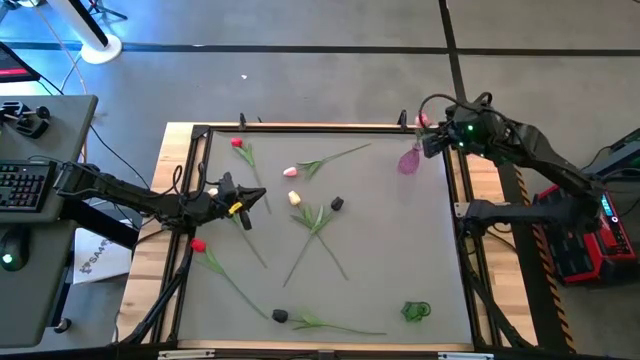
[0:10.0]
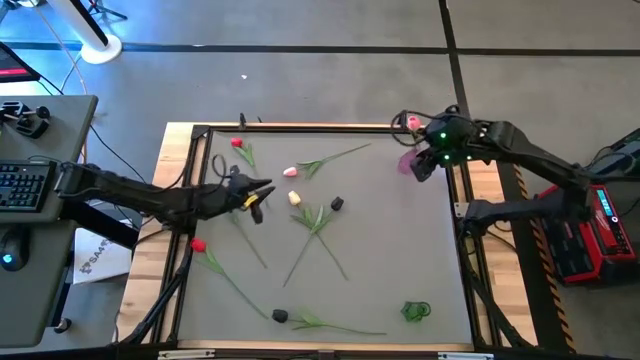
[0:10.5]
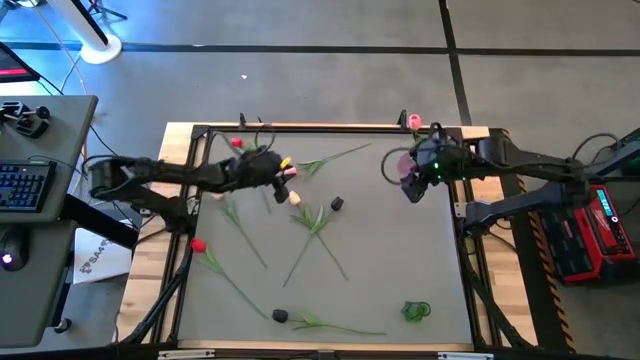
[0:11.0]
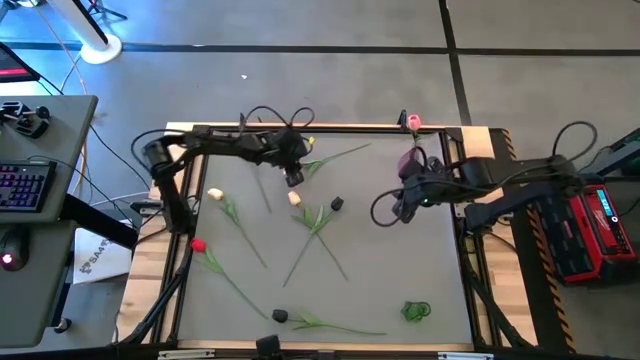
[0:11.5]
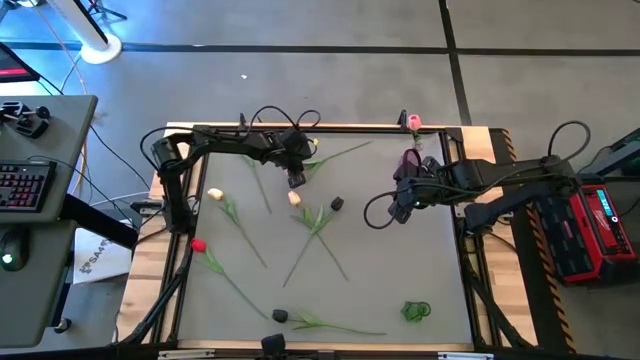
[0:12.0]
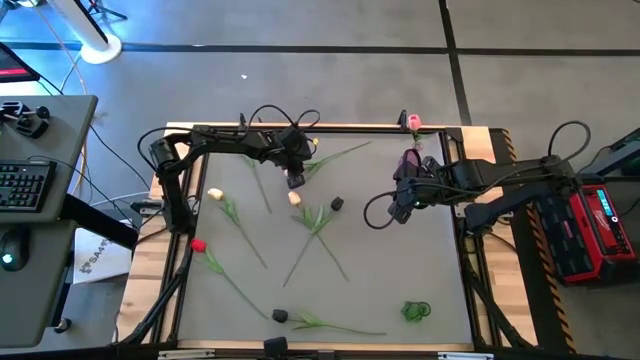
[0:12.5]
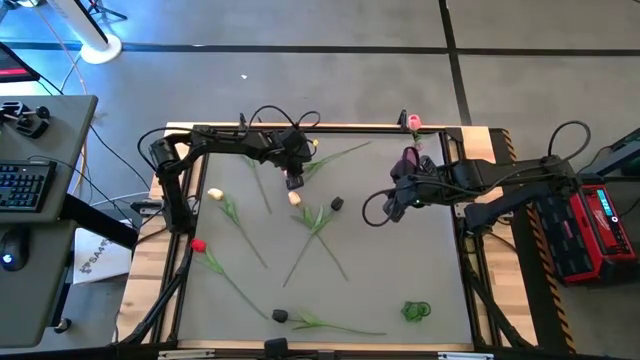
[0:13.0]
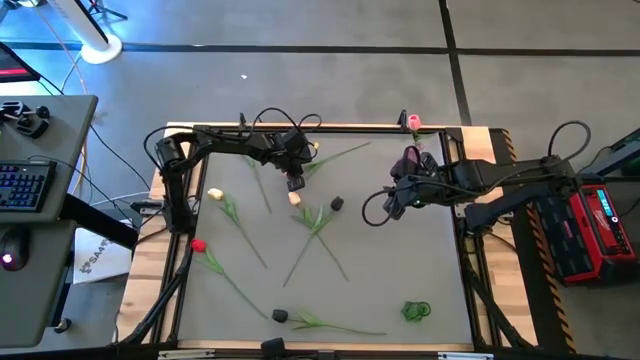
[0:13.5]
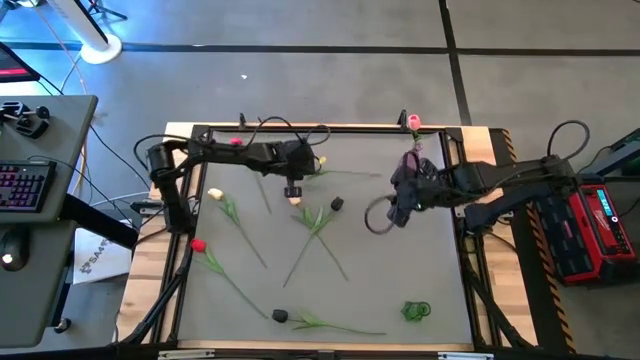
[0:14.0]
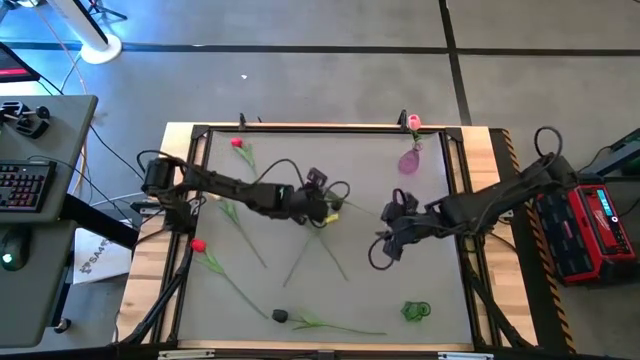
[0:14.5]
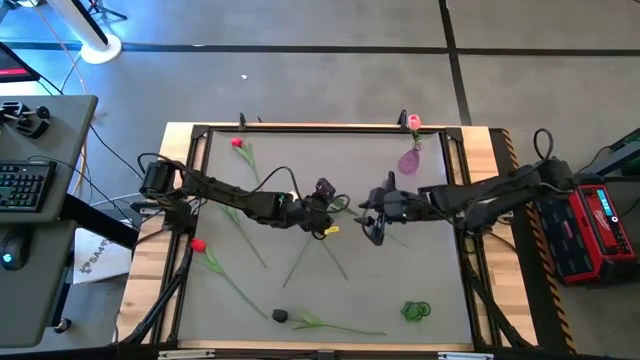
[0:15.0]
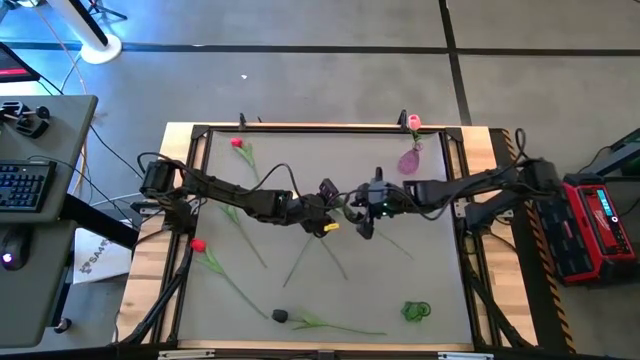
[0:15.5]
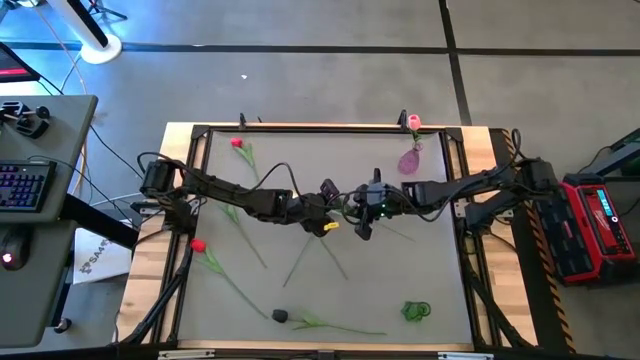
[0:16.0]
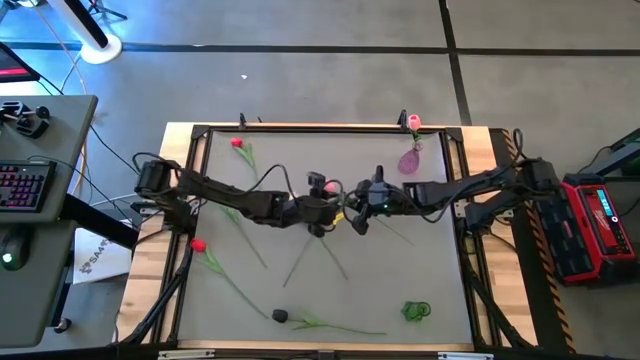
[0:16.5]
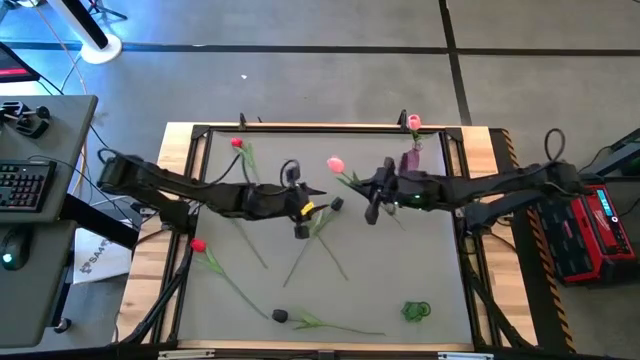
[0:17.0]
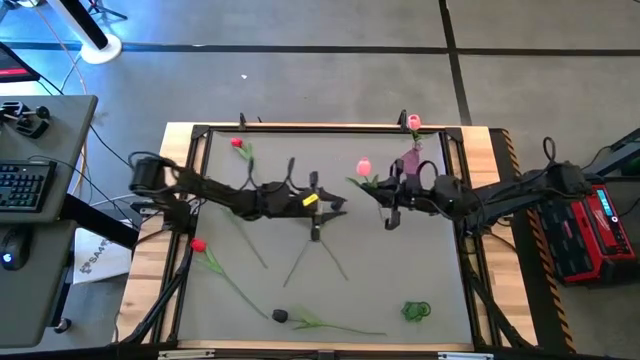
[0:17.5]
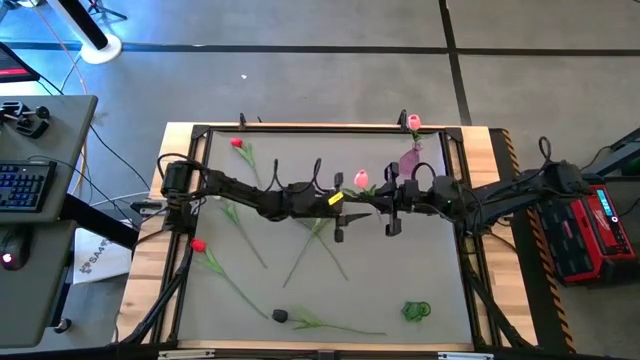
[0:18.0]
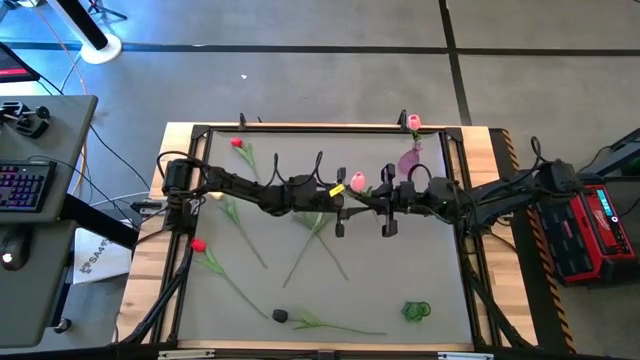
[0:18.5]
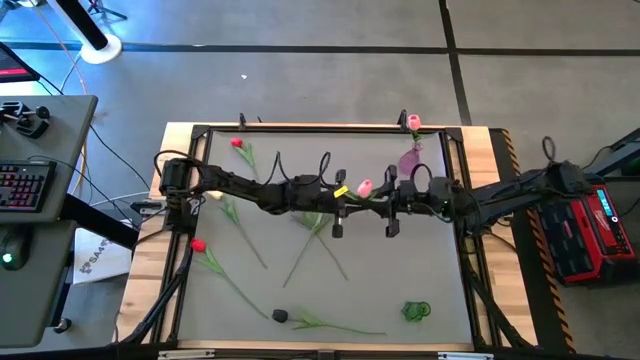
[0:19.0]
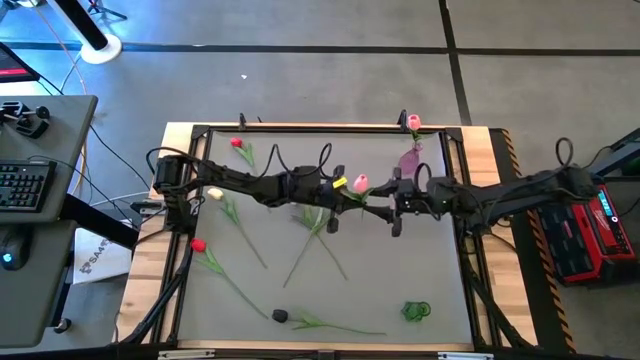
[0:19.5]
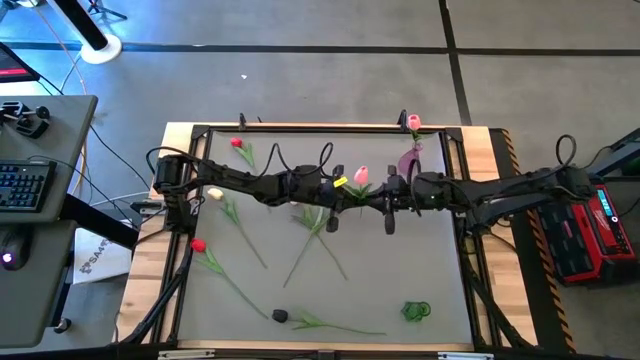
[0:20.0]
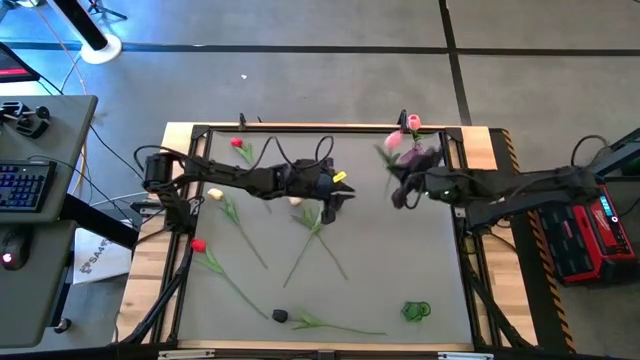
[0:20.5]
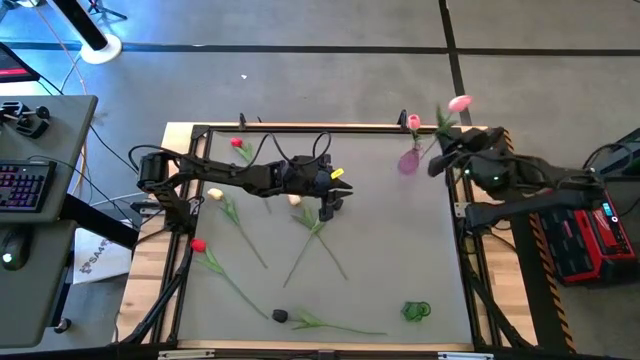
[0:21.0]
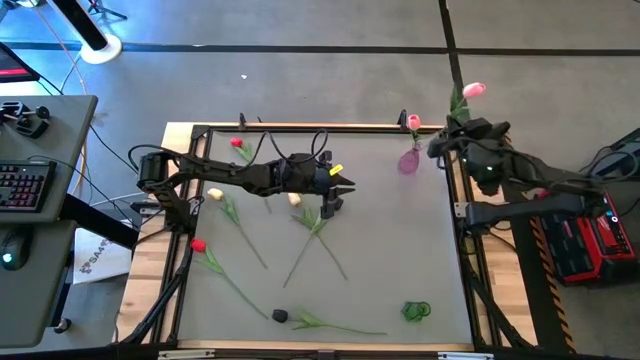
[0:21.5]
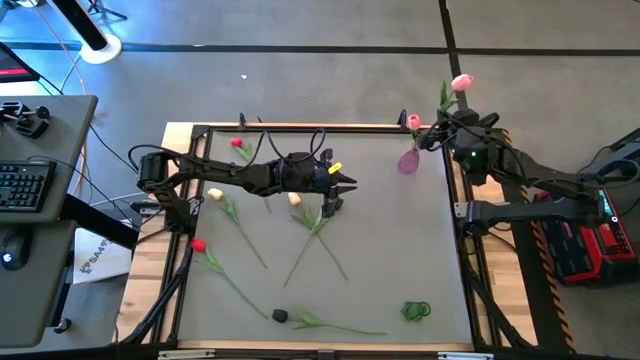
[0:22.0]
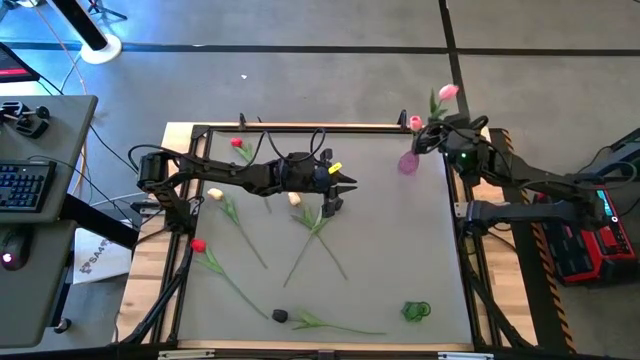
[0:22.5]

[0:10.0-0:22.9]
Task: Sort flowers into vase by color
Put the pink tulip into the violet vase

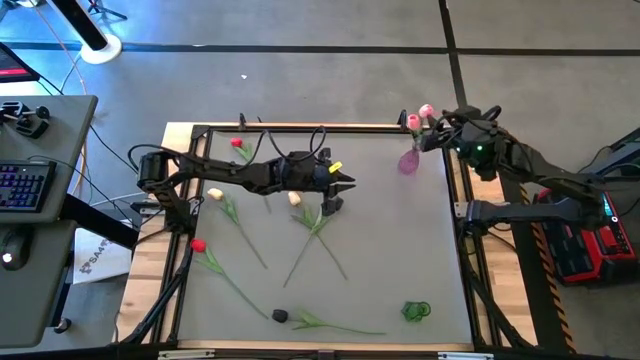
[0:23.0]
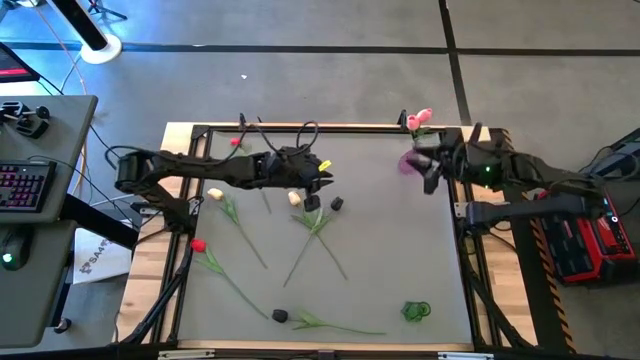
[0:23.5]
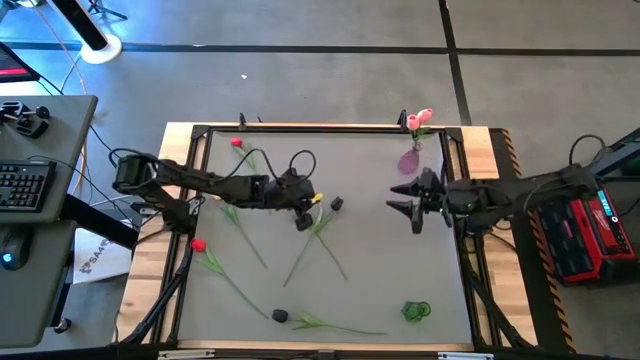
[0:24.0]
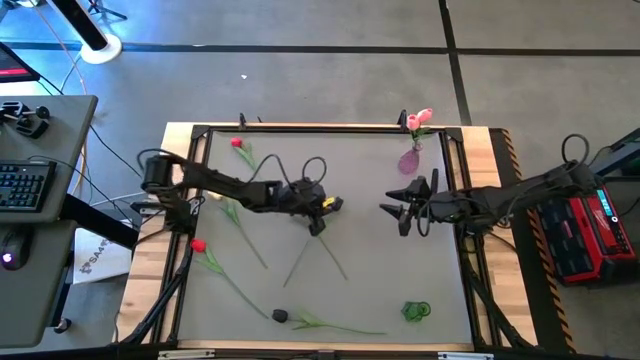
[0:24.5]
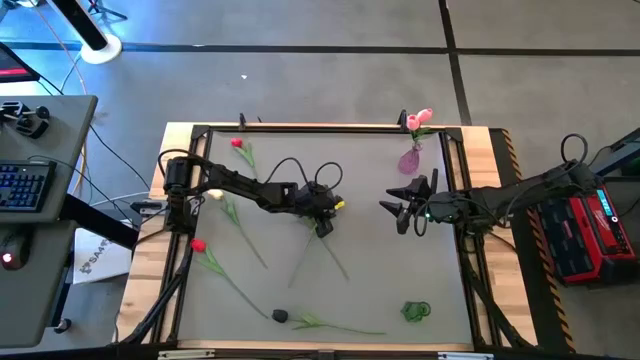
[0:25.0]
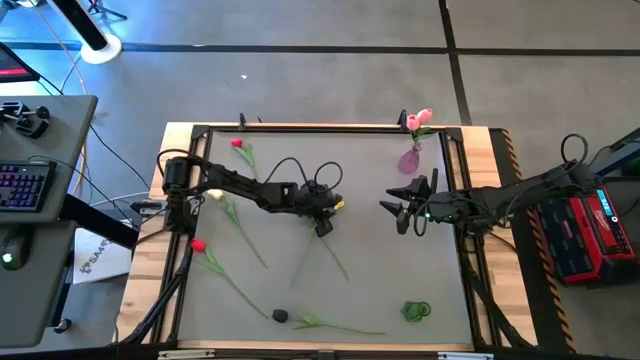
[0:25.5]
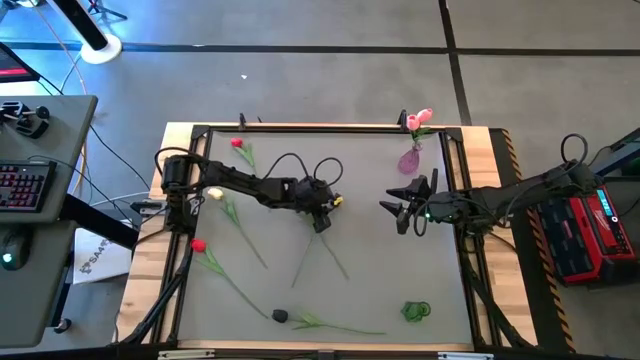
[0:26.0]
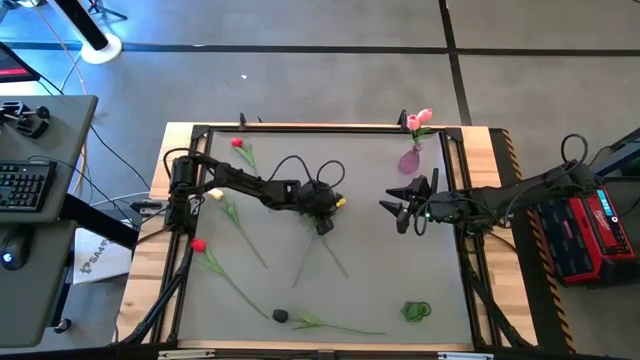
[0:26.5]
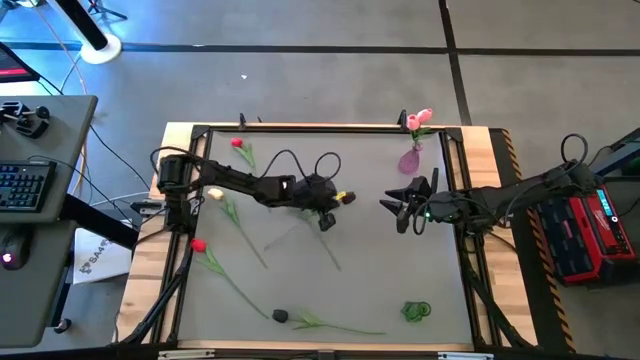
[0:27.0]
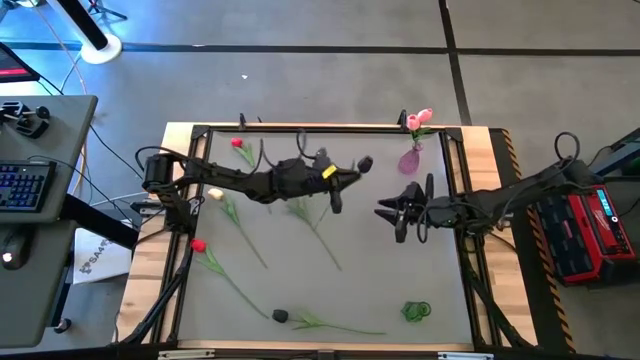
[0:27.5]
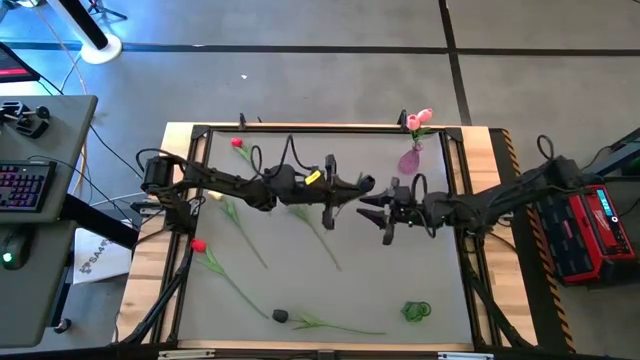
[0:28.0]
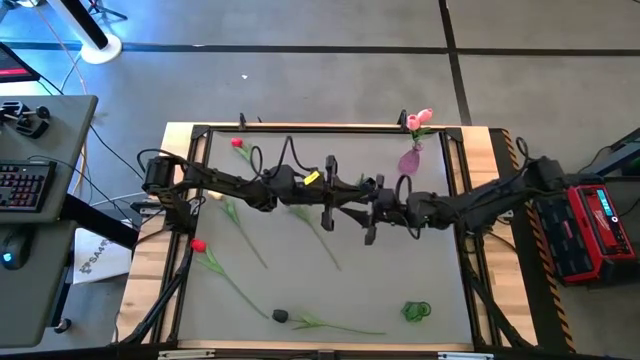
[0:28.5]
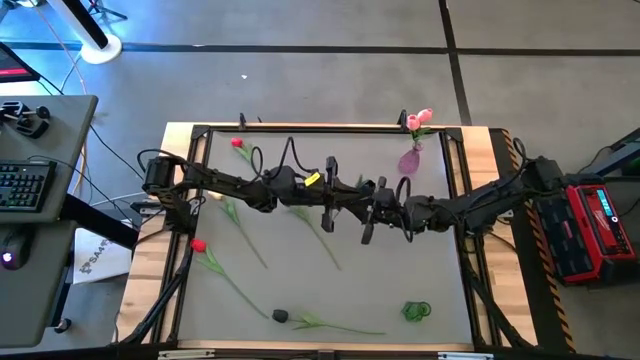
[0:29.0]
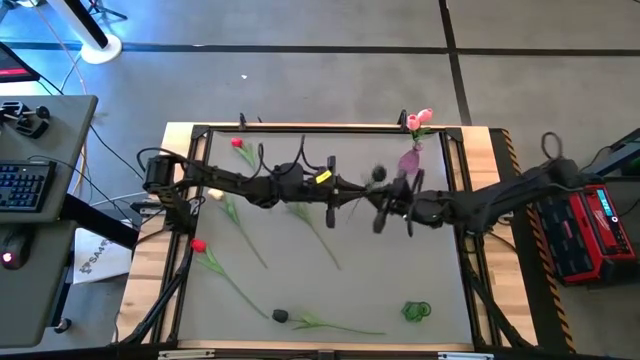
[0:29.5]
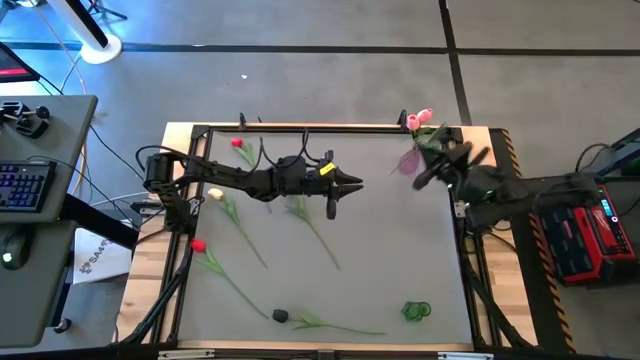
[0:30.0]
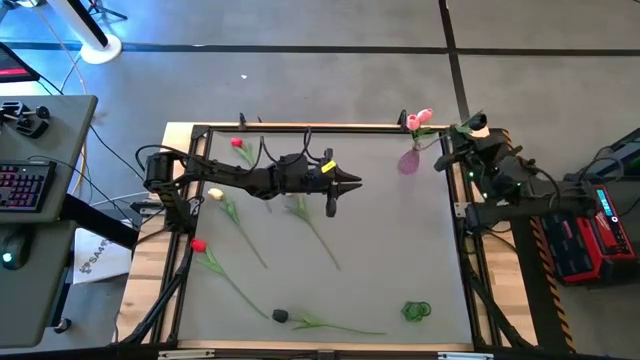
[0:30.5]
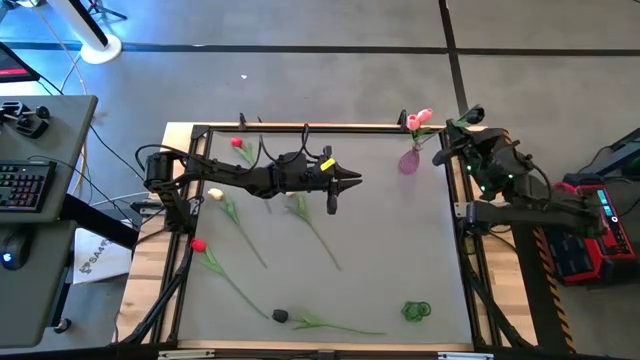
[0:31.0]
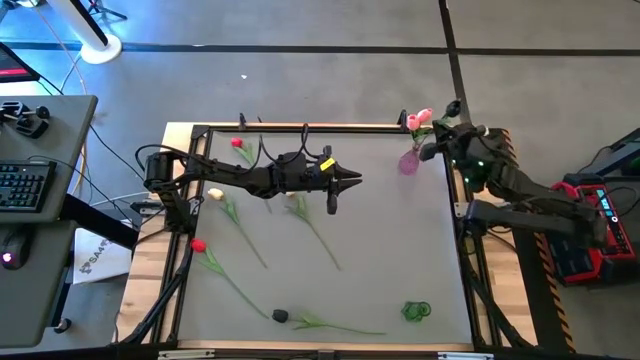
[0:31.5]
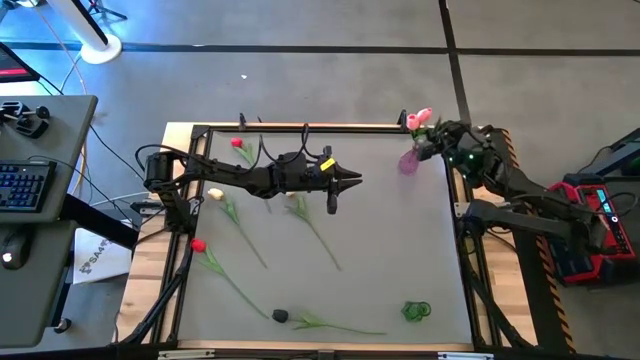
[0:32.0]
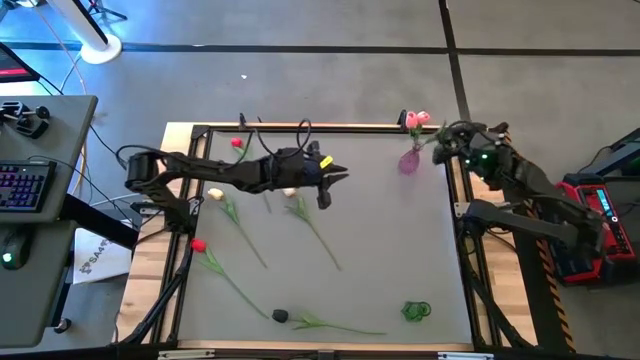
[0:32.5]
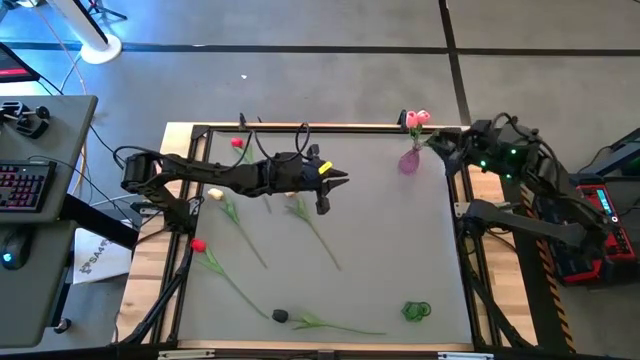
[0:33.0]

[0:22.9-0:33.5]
Put the top black tulip into the violet vase
